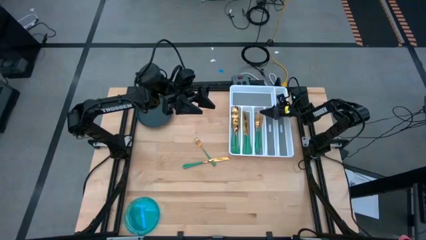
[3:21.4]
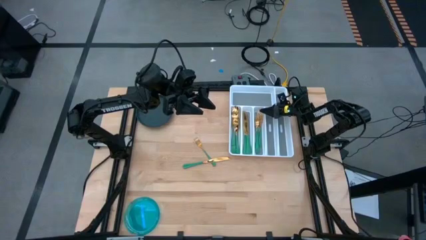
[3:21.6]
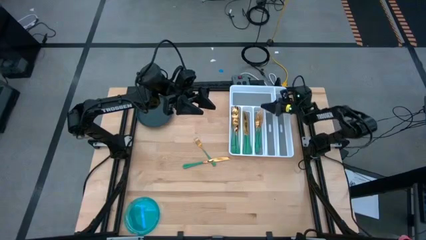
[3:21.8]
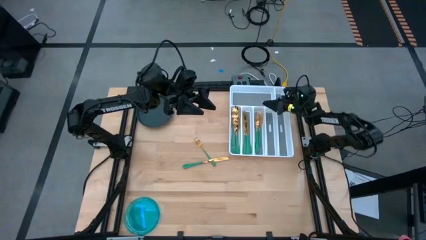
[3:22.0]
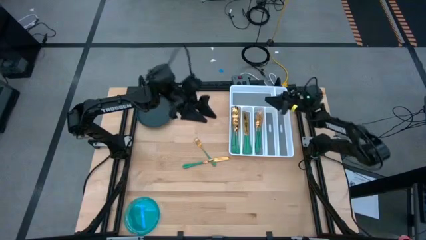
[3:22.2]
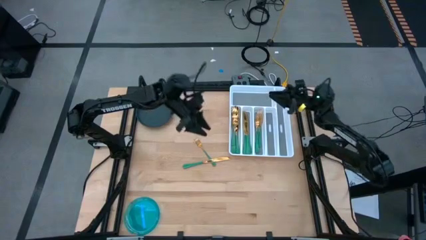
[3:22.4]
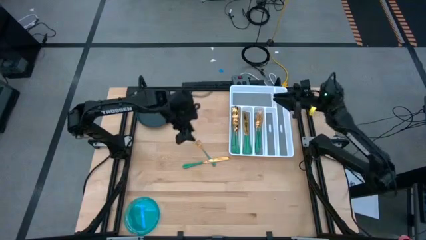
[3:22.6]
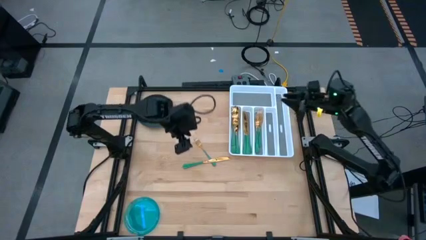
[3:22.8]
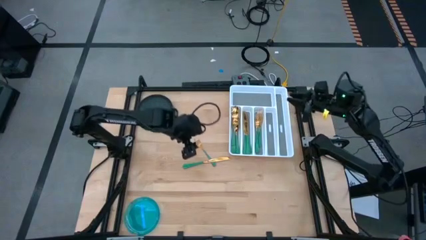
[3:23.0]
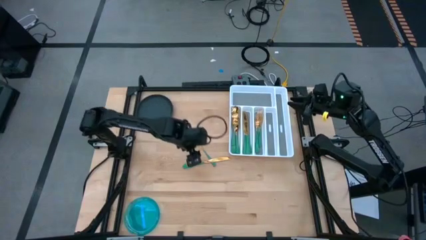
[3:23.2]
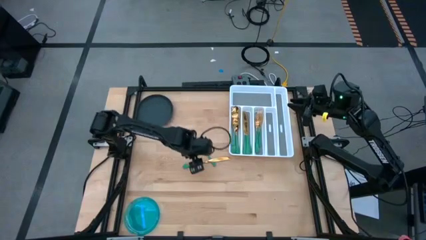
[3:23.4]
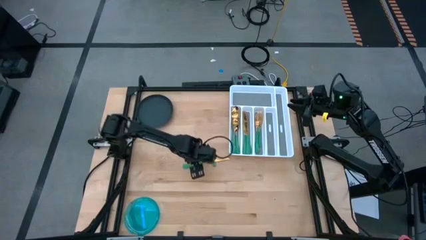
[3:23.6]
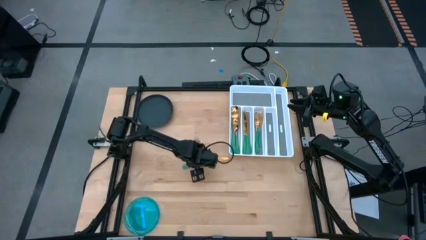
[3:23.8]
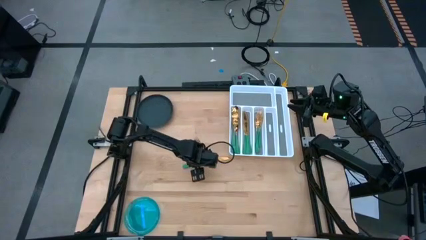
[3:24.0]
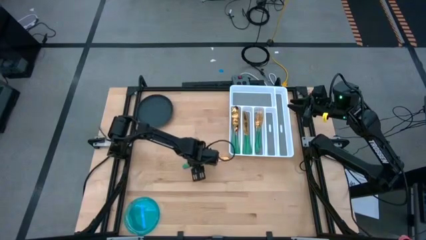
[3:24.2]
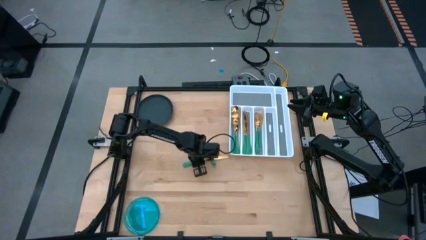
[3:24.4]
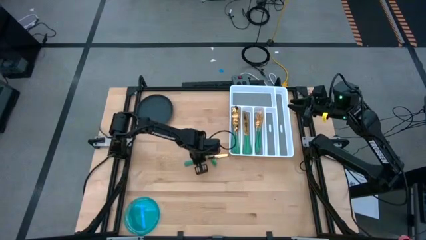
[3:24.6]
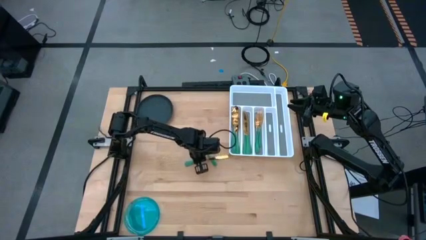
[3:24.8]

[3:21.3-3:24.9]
Task: Sort silverware
Put the green knife on the silverware organizer

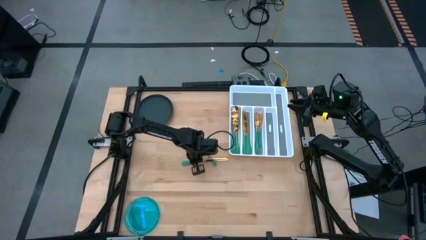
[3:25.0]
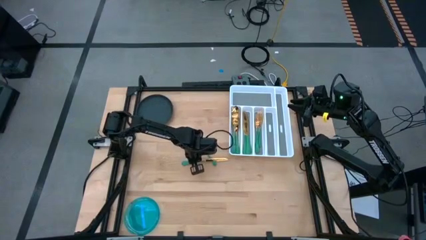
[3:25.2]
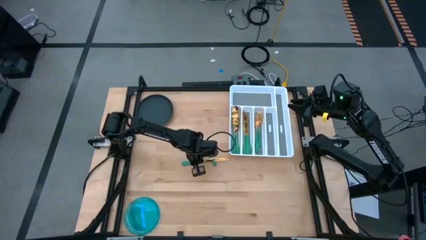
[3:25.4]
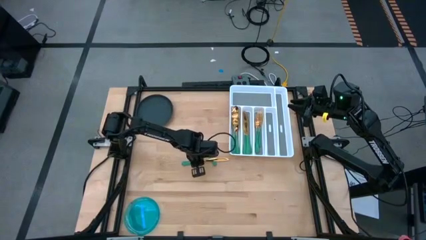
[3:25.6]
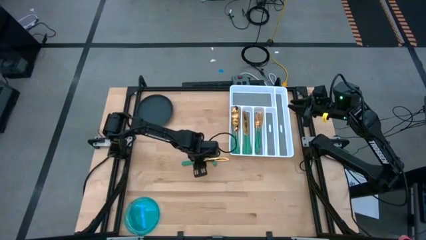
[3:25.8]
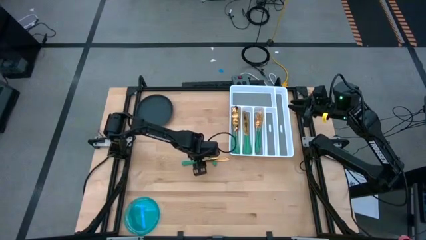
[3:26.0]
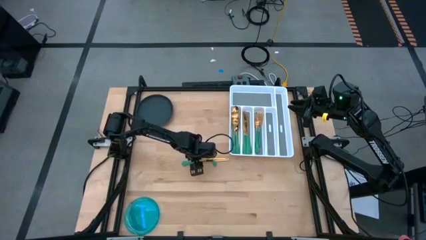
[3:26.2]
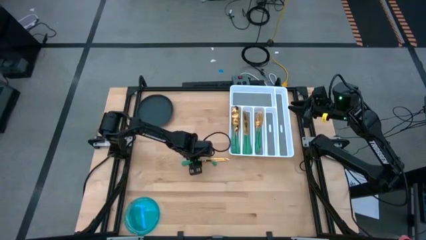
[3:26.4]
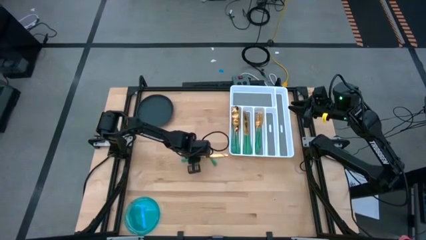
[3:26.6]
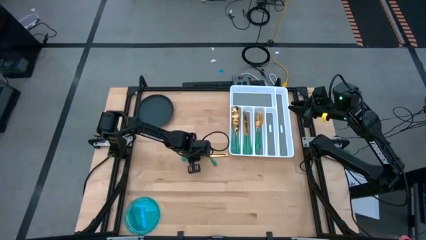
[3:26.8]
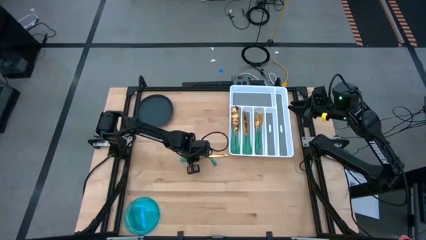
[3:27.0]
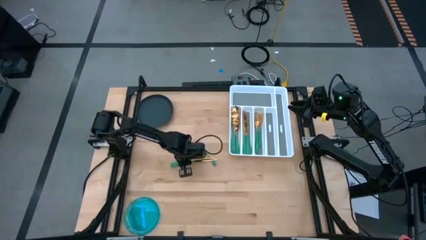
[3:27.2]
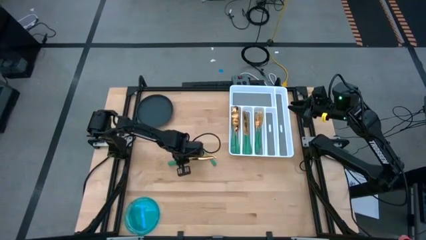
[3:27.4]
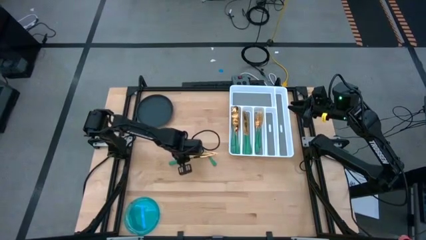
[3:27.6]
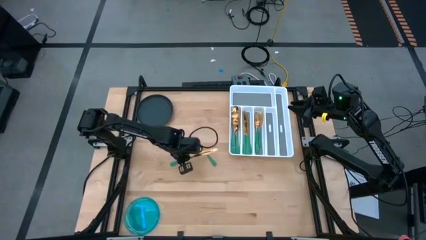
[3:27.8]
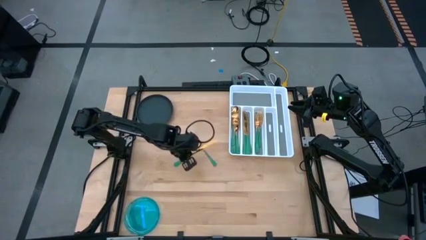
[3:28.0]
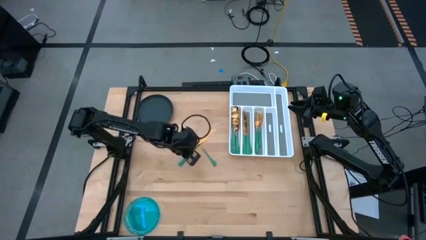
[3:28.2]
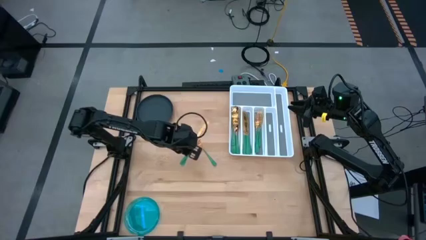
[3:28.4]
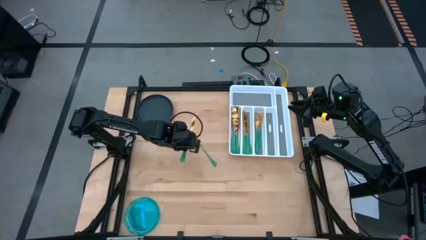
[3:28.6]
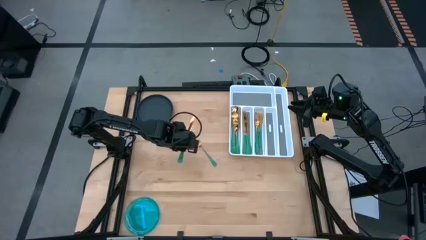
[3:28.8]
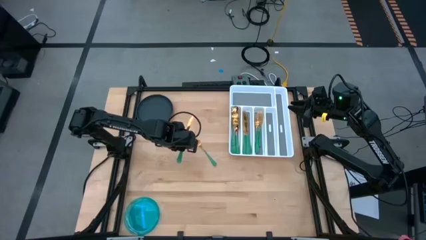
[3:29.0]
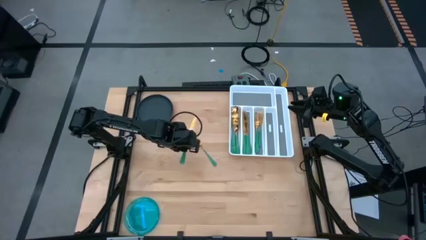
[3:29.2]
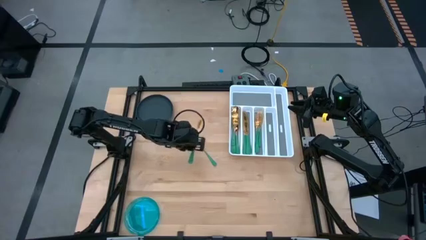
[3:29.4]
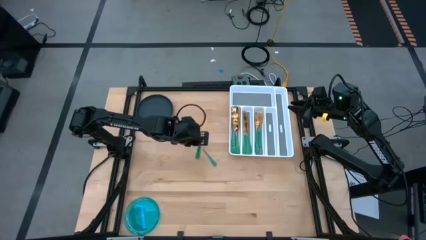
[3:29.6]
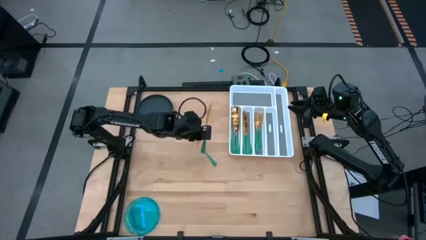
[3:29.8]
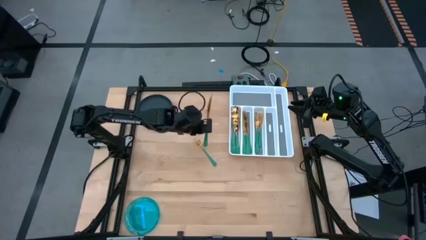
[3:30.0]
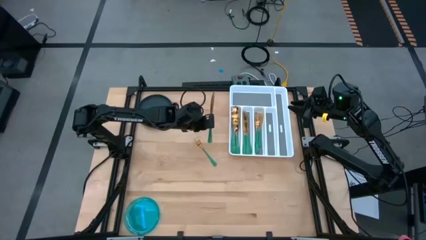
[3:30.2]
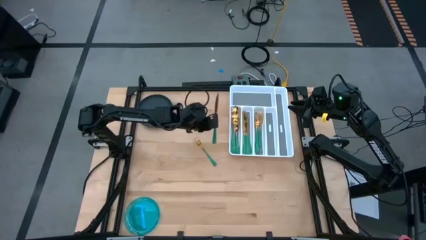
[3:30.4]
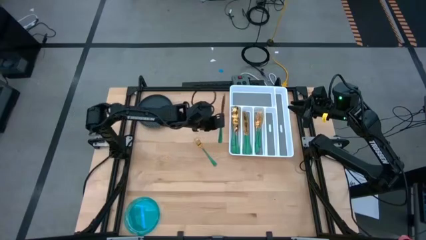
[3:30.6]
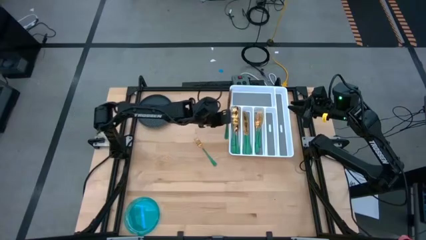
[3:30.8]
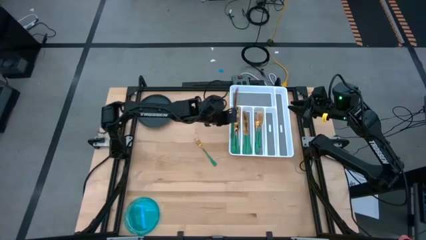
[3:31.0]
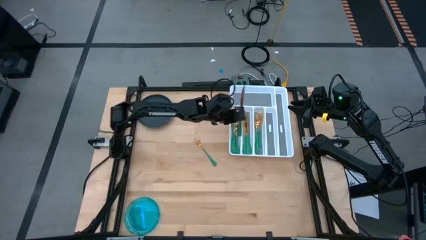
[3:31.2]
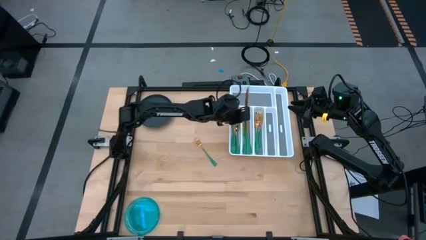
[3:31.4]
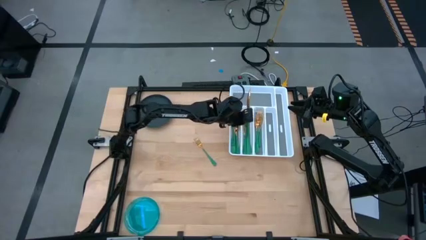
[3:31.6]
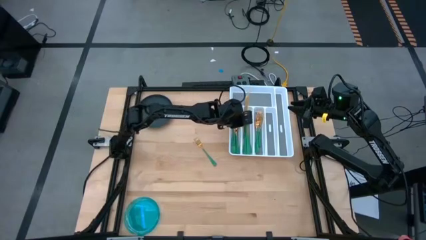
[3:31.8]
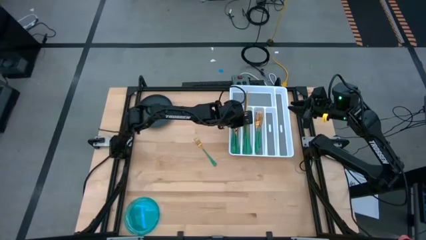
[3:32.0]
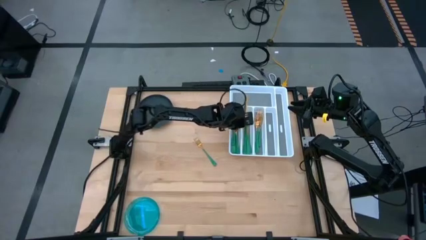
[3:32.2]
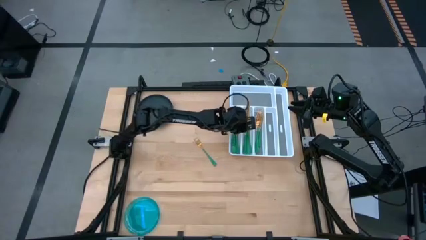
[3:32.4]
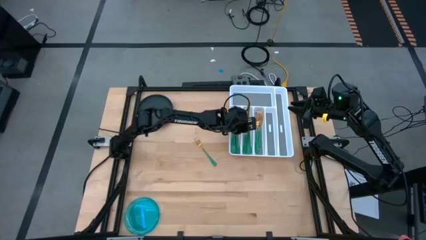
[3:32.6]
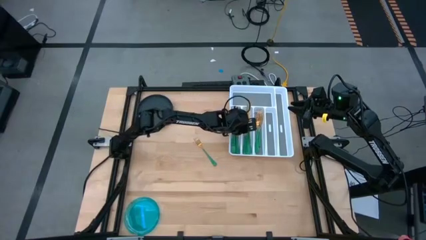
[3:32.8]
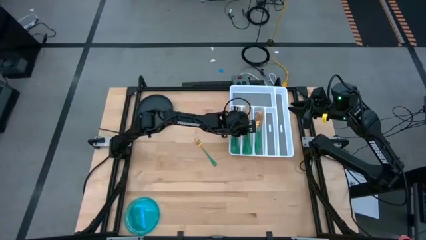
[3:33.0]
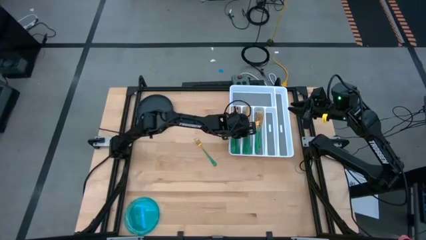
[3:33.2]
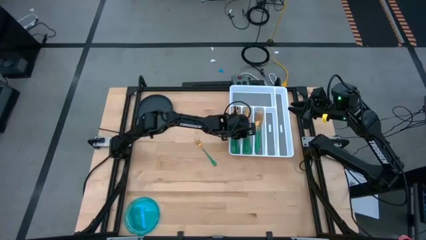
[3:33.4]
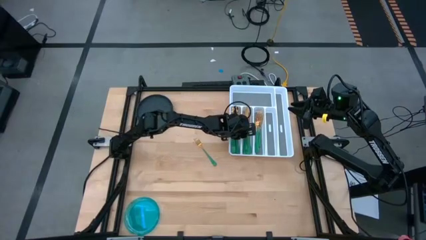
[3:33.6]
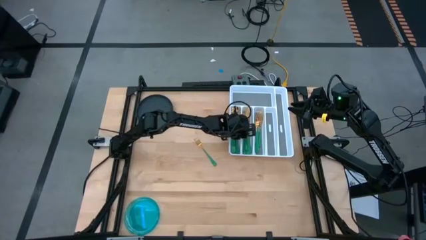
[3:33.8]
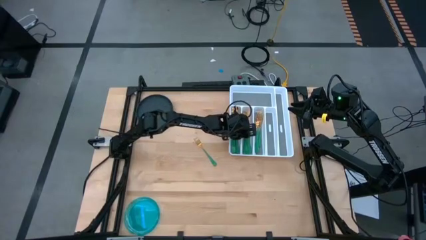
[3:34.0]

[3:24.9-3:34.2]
Put the green knife on the silverware organizer

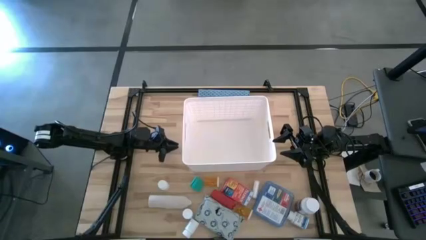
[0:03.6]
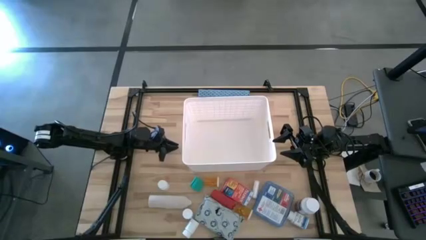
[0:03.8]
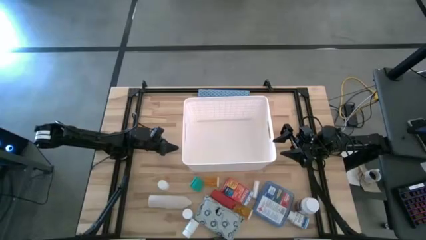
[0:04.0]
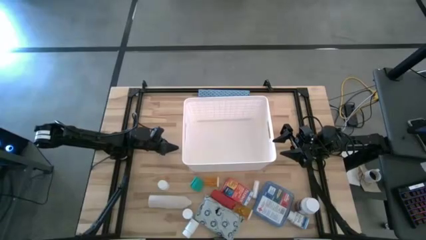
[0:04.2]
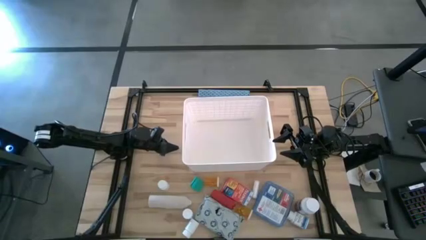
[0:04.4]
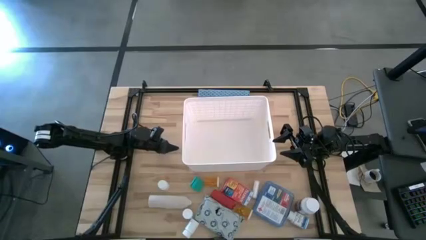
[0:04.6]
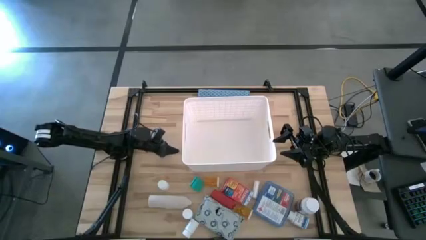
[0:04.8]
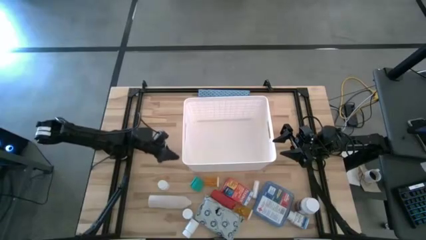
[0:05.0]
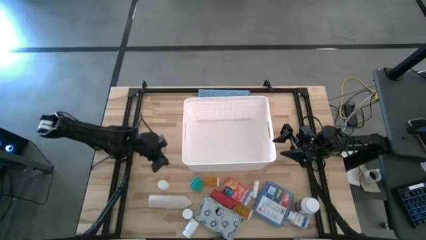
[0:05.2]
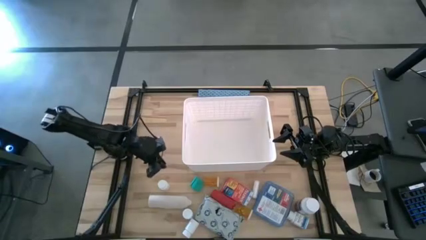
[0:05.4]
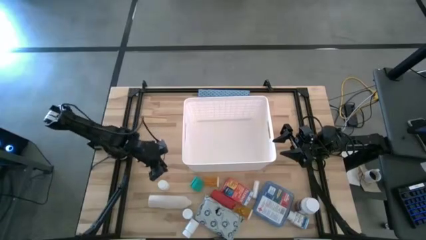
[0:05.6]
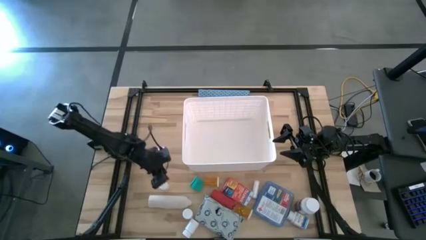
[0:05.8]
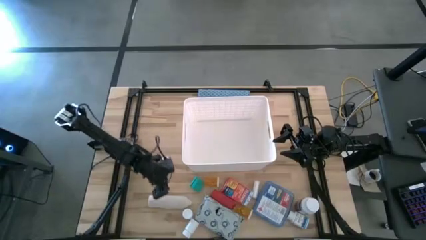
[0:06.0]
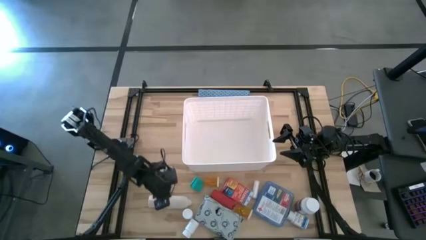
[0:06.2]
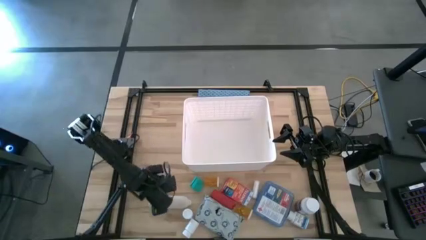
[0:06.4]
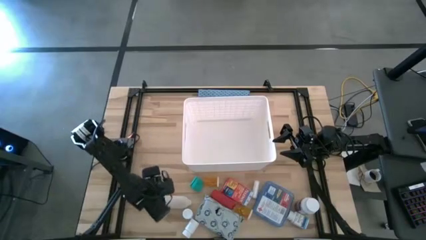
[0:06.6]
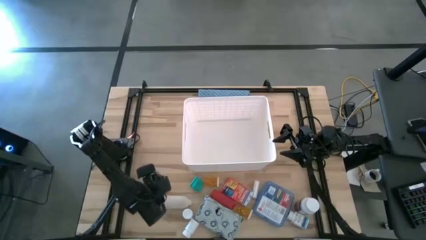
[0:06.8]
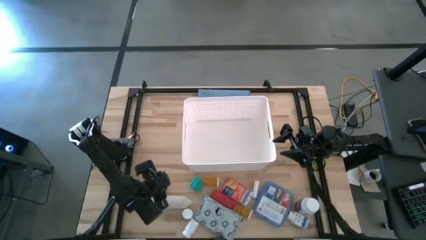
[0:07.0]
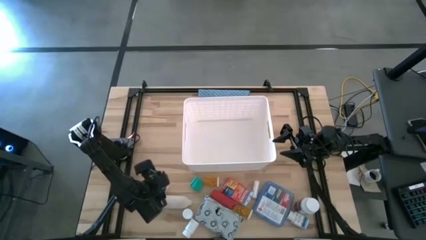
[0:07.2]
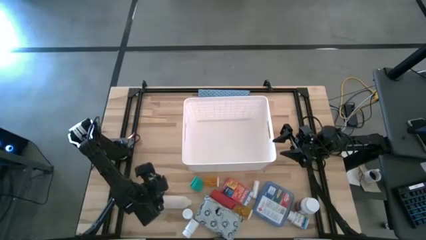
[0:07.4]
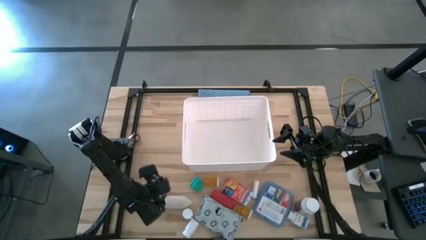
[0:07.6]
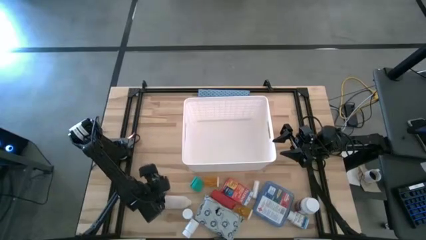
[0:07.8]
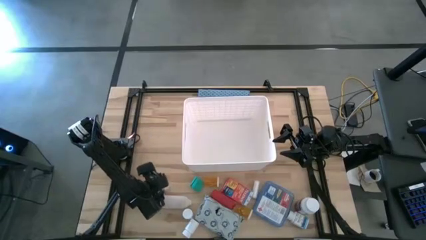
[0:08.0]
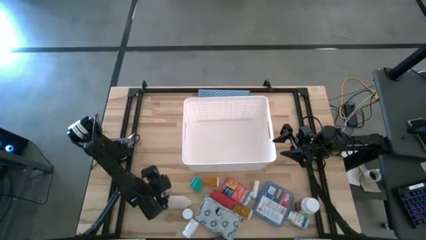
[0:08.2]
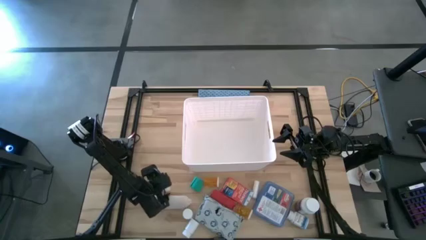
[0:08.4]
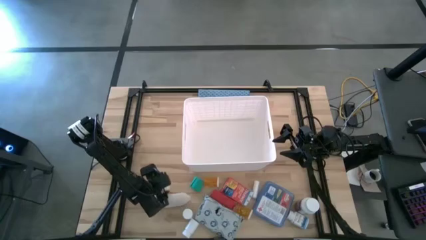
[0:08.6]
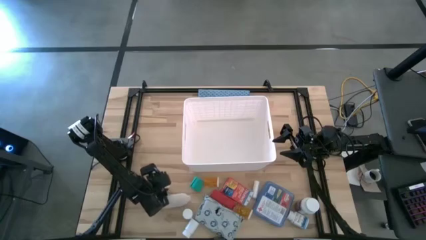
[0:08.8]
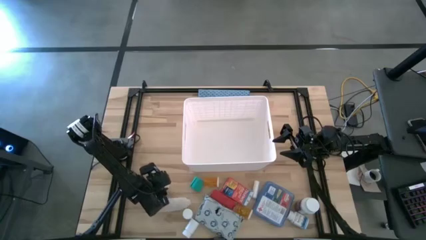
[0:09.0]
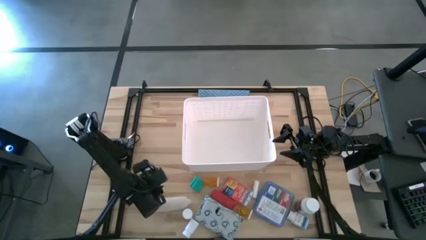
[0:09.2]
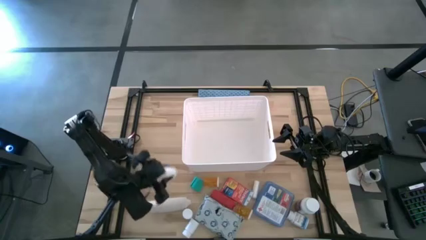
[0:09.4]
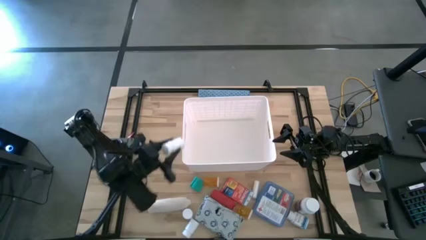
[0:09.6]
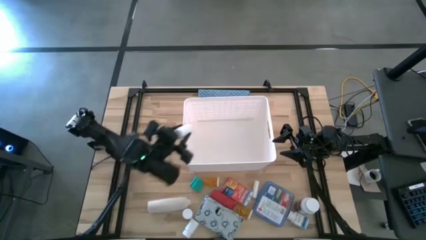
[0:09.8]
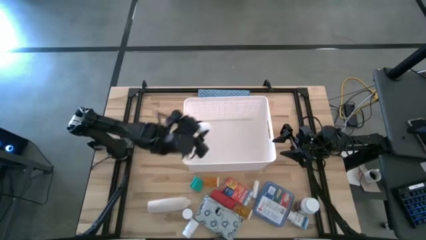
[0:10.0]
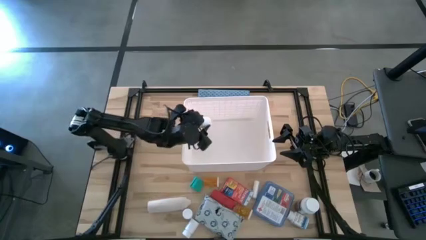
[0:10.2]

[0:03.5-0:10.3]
Task: Pick & place medical supplies in basket/bin
Put the top white medicine bottle into the white bin
